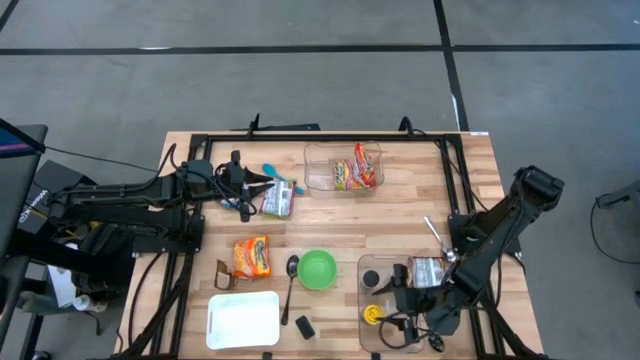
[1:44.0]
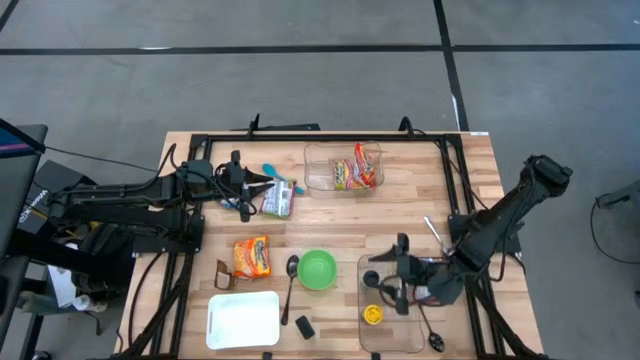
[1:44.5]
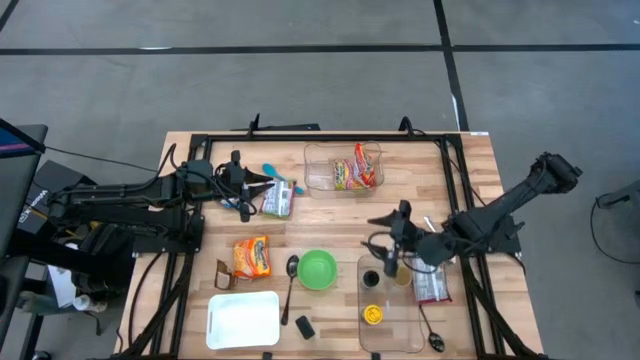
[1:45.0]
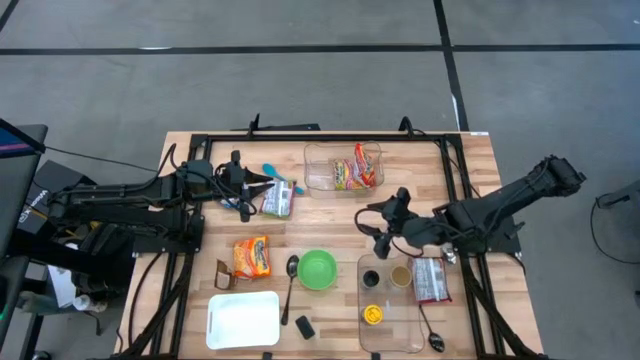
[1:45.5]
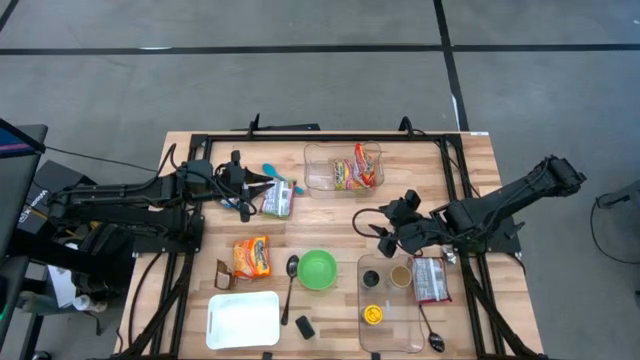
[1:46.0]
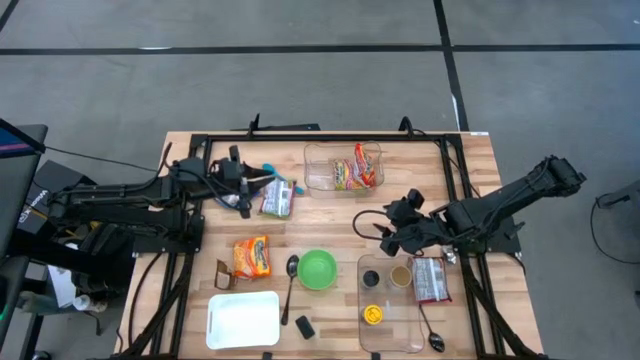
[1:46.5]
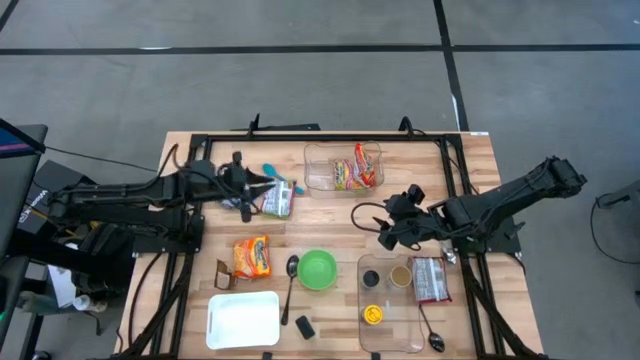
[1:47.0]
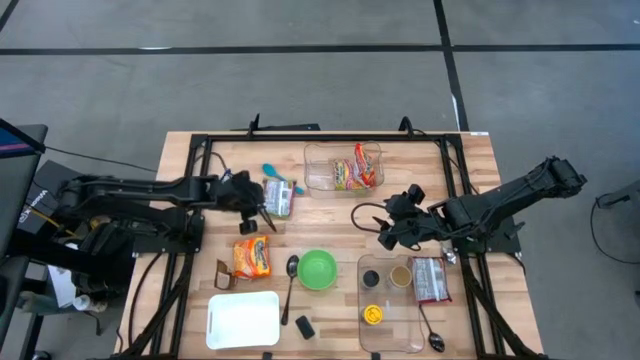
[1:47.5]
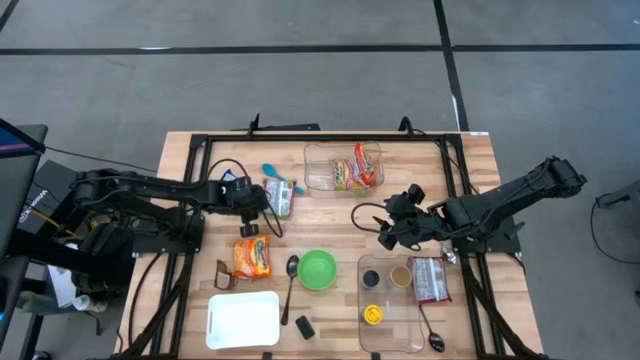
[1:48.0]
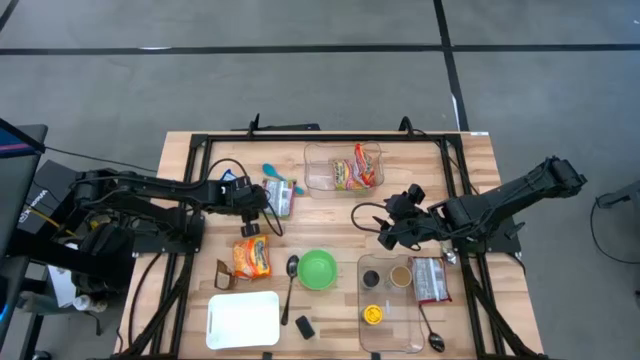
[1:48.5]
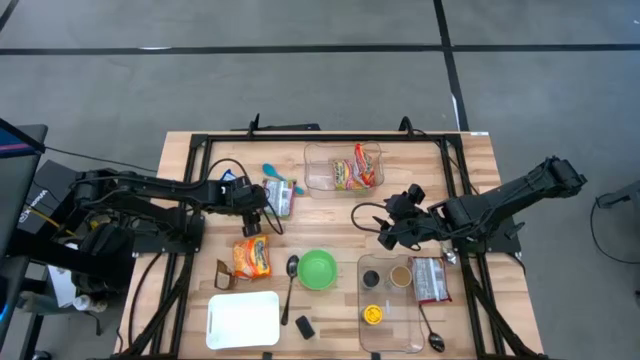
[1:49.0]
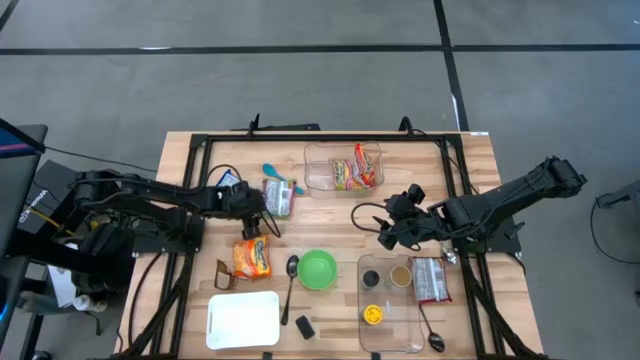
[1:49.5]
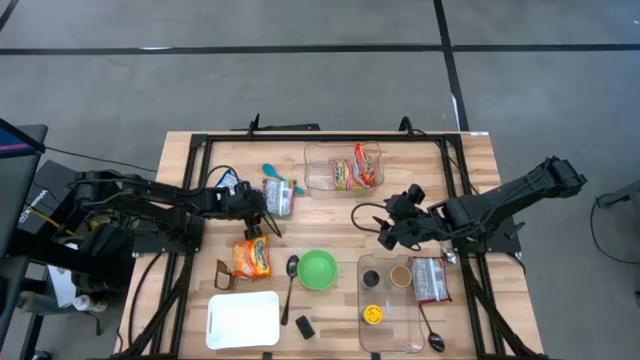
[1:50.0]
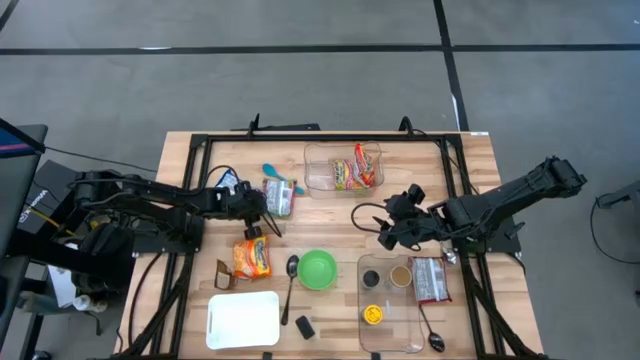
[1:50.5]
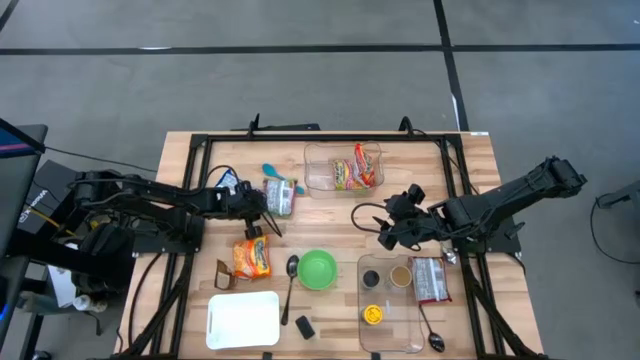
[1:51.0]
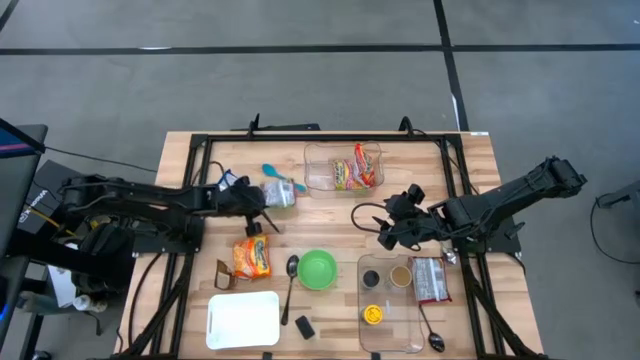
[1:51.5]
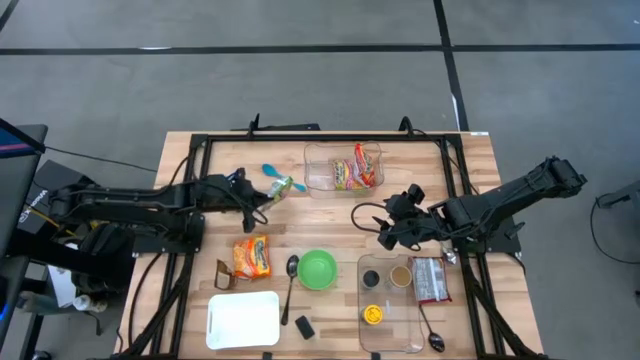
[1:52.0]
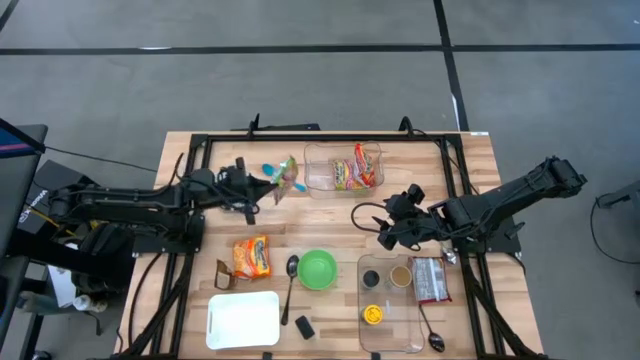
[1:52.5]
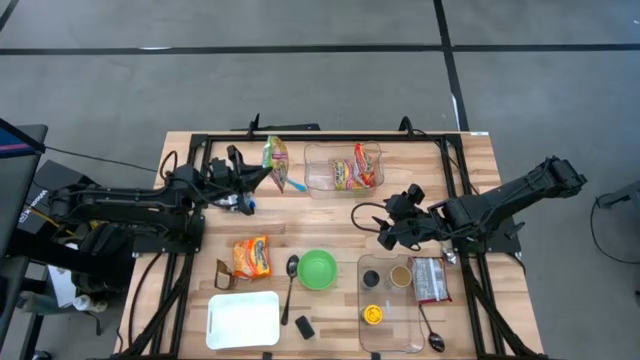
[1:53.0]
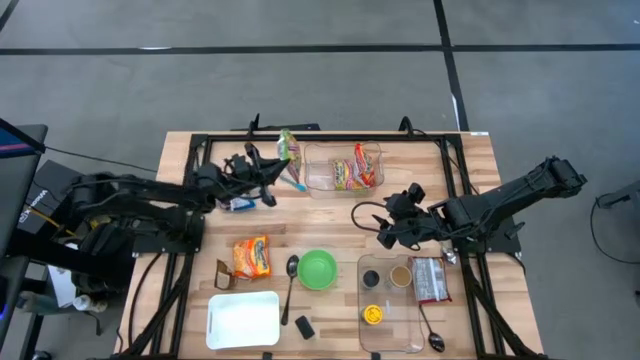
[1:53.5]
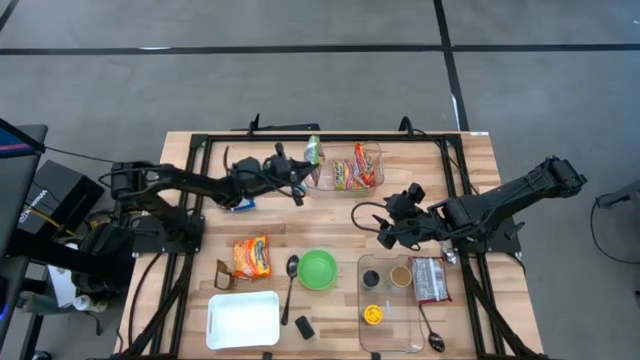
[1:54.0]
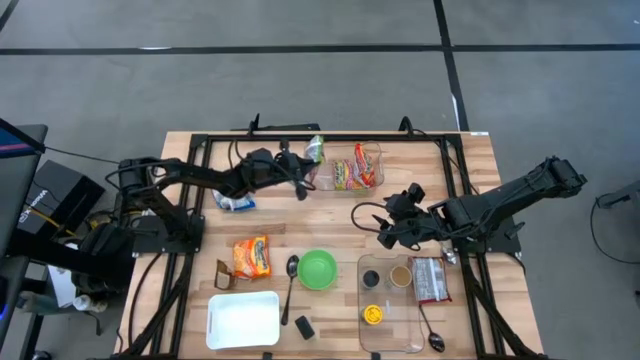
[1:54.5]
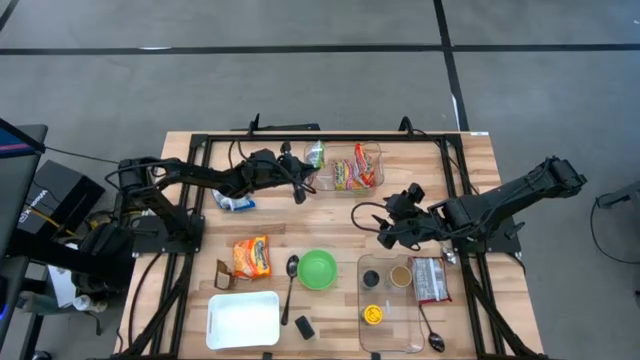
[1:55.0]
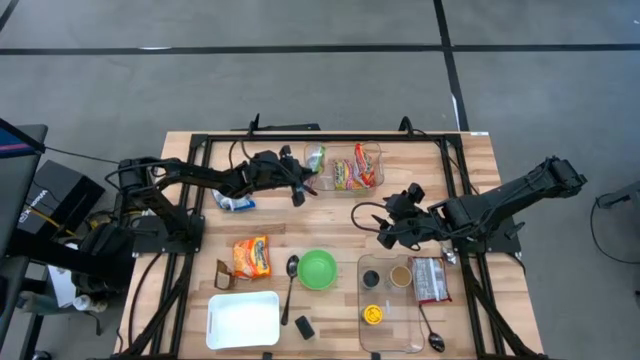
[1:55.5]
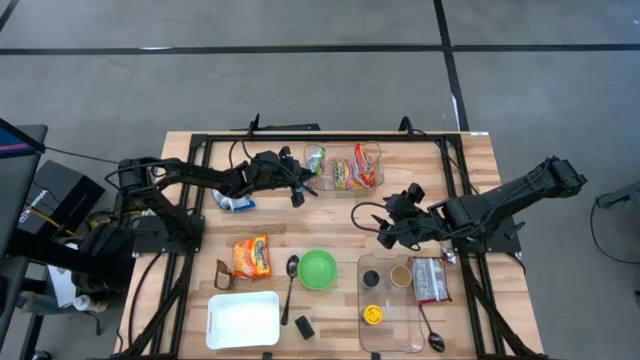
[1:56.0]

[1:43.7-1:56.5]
Task: Pick & Place Food Item
Put the green noodle pack into the top transparent bin

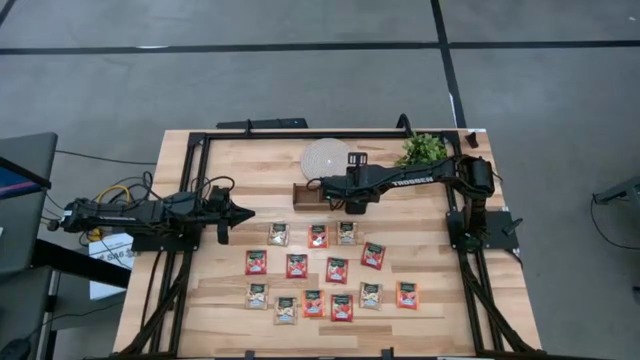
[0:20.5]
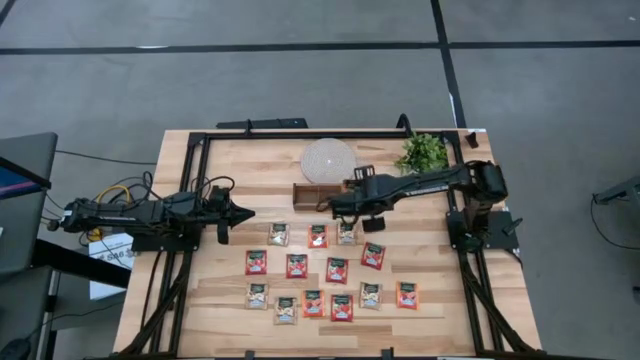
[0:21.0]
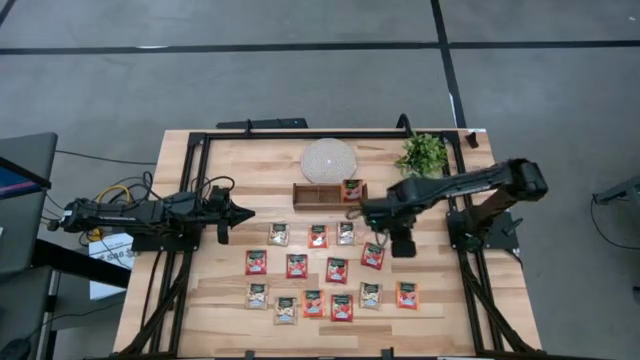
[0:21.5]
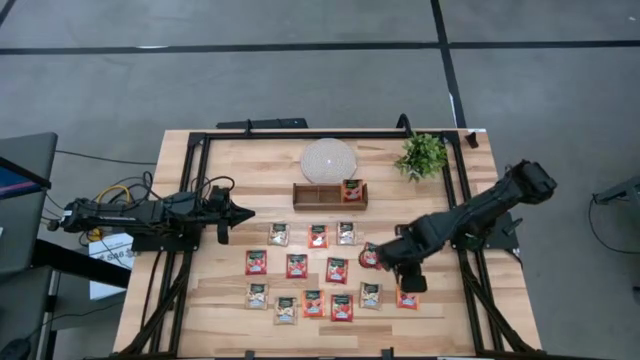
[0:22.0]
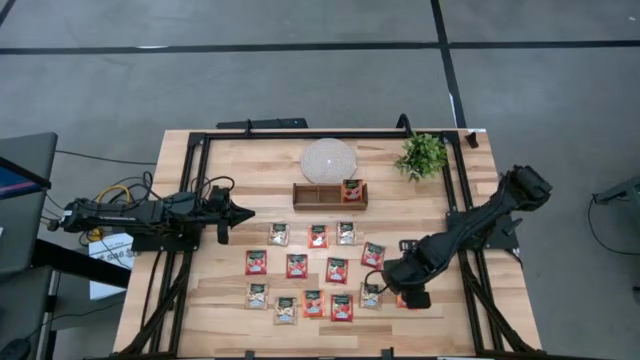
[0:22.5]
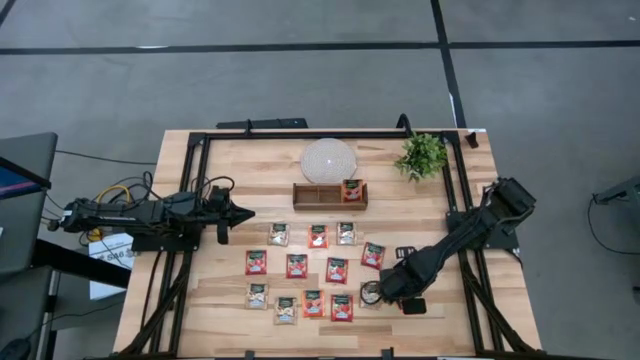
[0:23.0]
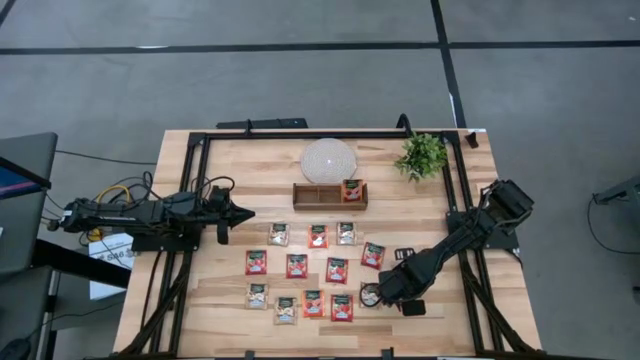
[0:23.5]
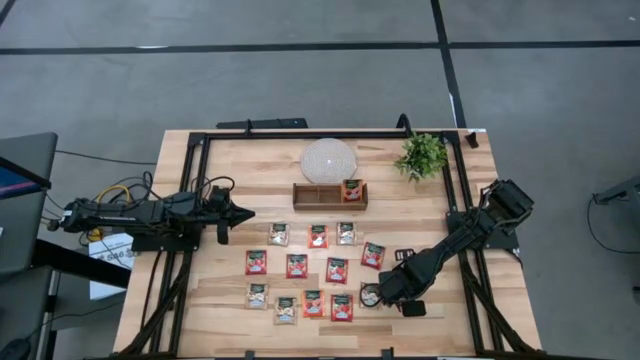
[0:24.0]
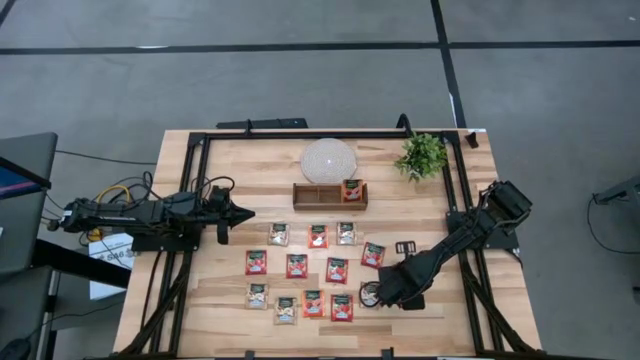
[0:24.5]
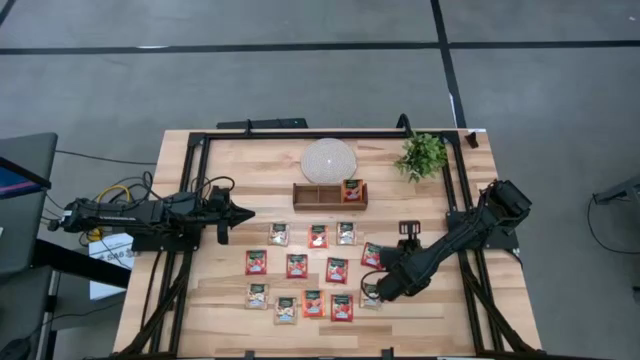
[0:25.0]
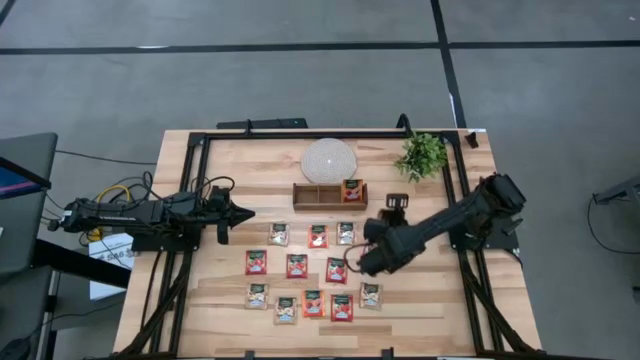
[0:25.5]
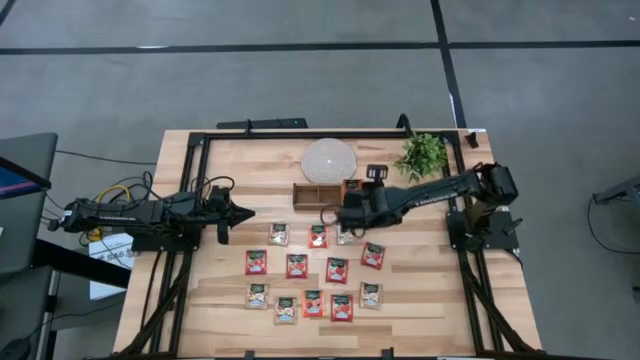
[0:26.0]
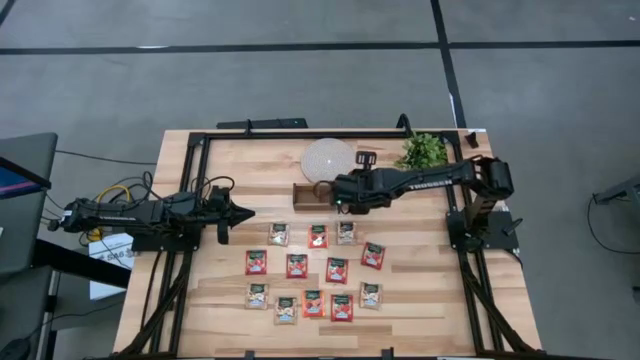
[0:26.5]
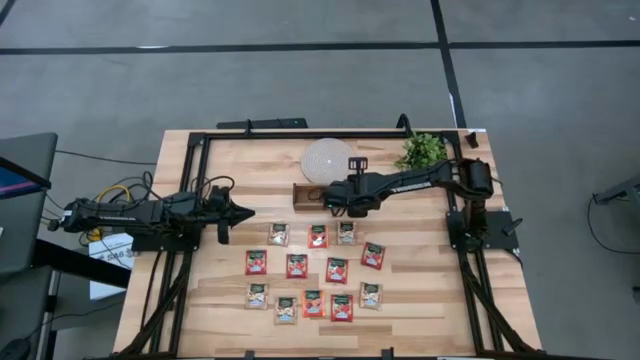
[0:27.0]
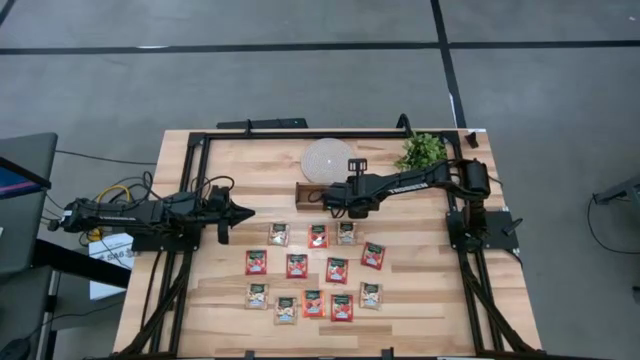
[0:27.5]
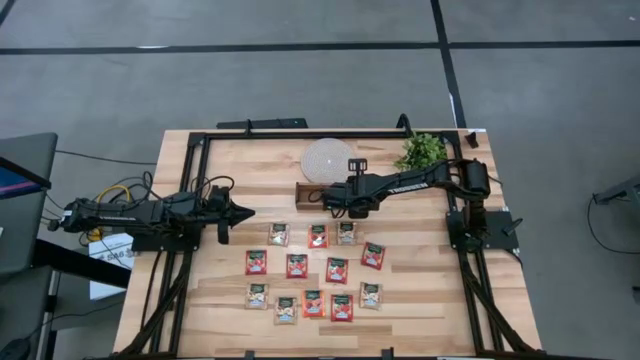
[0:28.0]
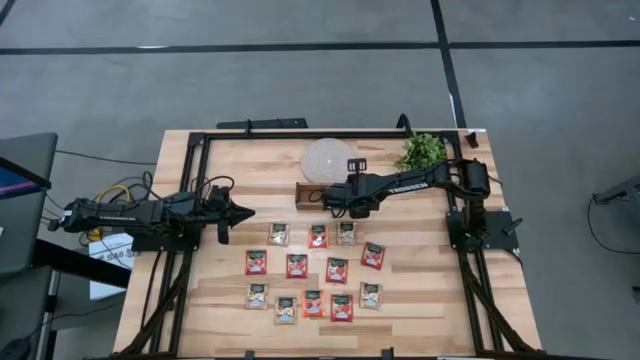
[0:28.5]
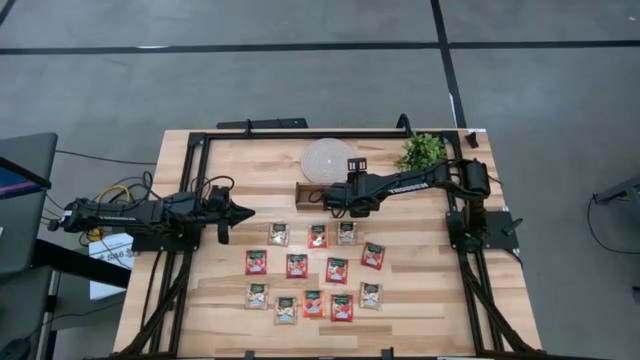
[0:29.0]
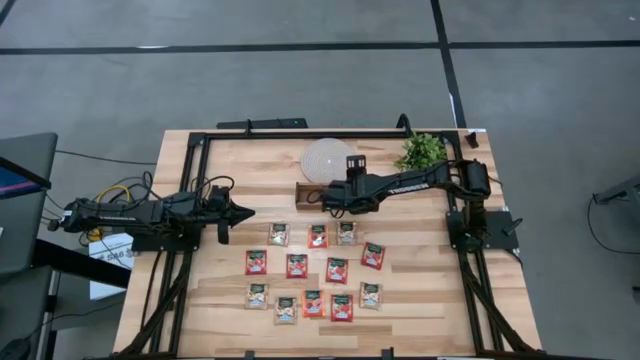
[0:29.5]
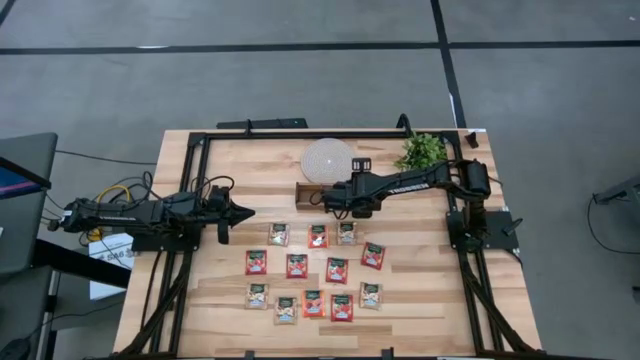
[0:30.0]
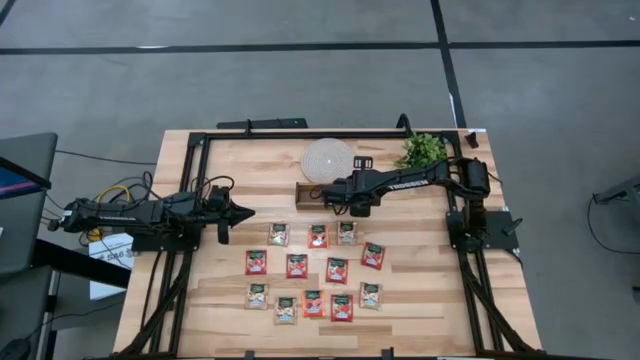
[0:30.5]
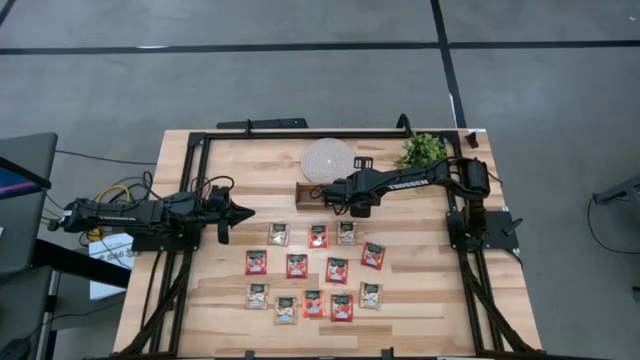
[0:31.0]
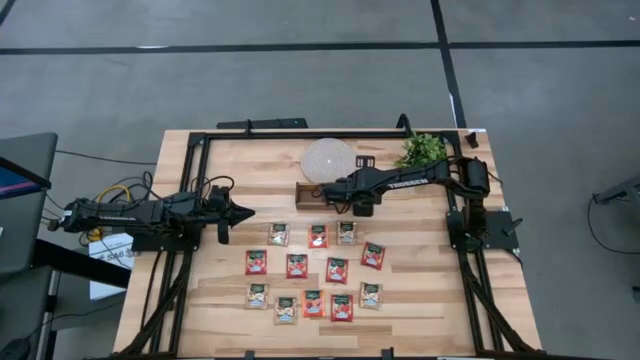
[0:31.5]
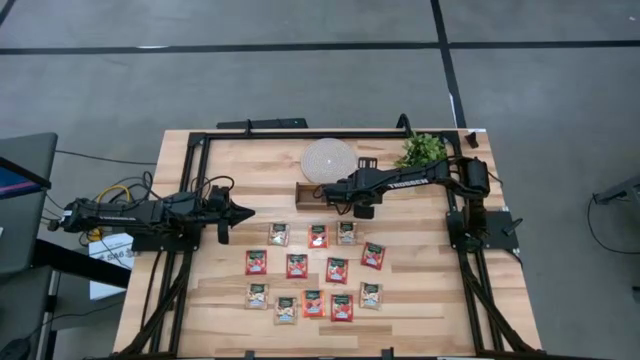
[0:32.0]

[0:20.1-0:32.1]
Task: Pick & Place Tea
Put the bottom right orange tea bag into the right compartment of the wooden organizer
